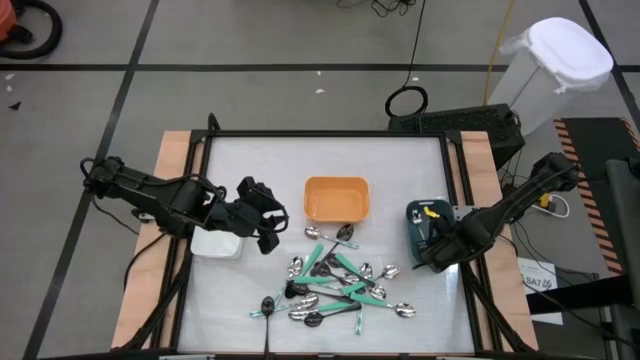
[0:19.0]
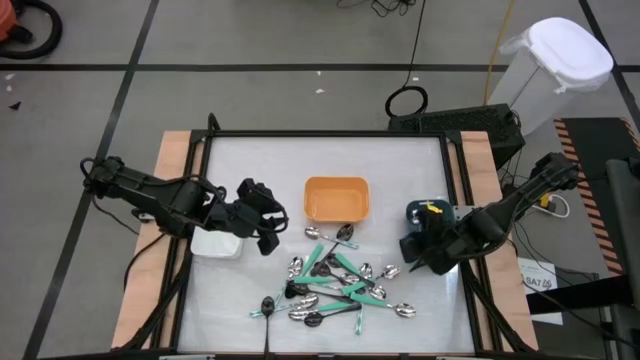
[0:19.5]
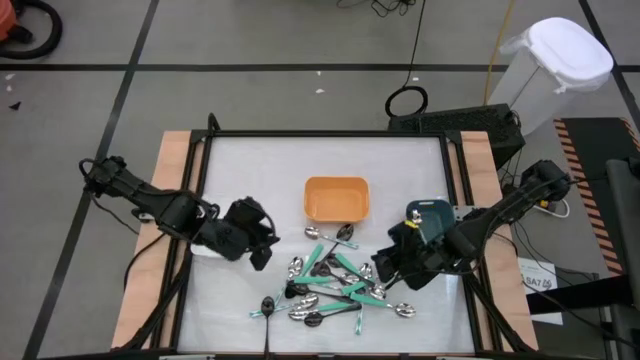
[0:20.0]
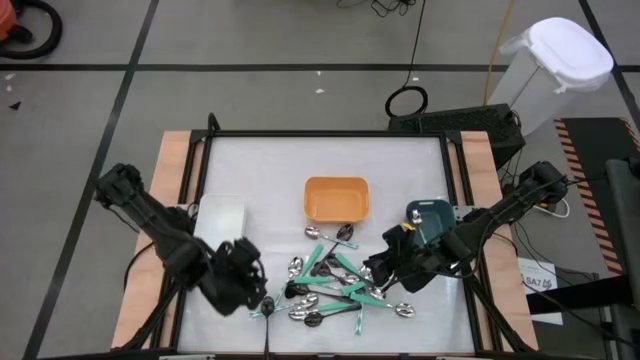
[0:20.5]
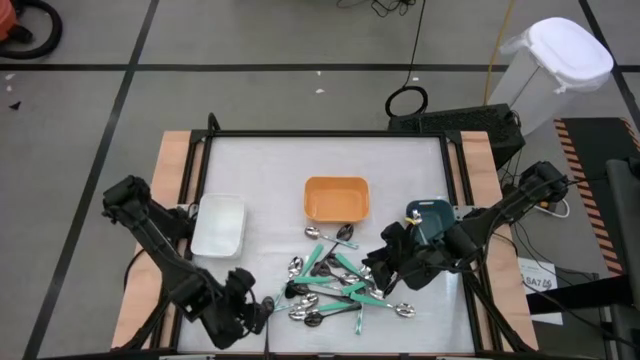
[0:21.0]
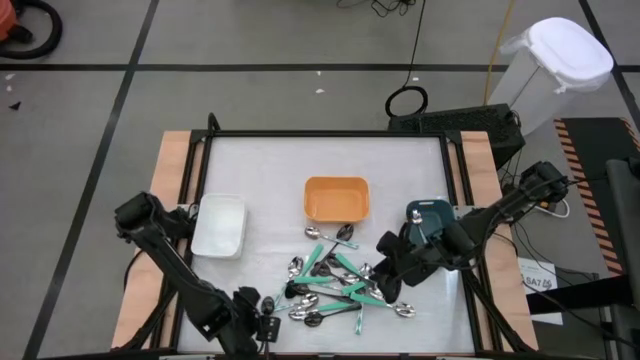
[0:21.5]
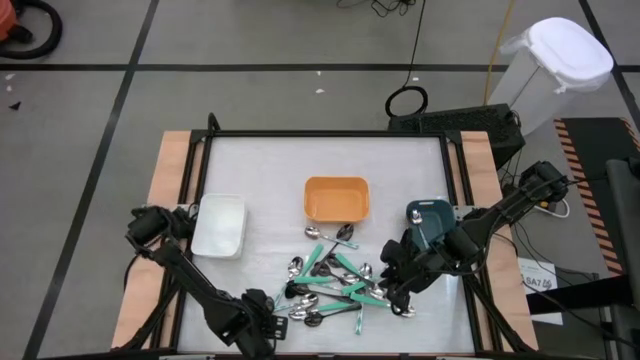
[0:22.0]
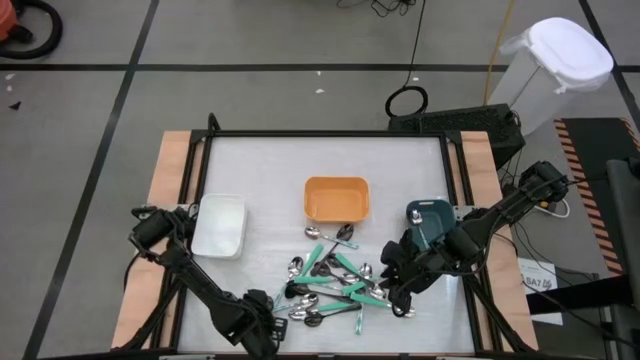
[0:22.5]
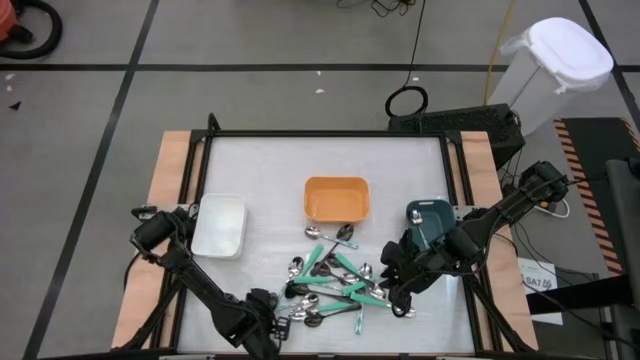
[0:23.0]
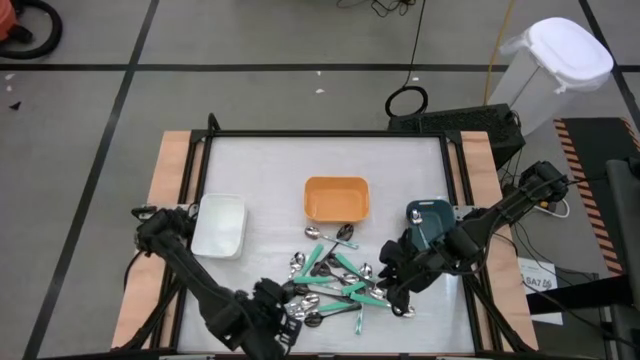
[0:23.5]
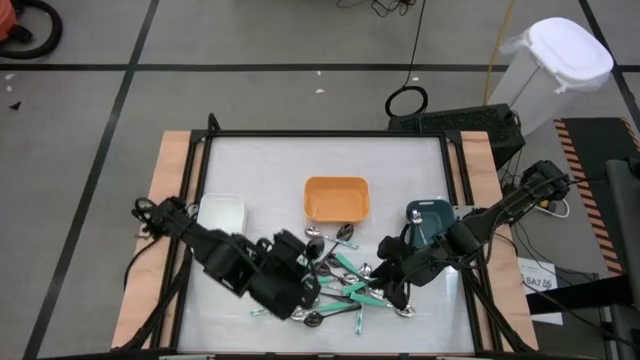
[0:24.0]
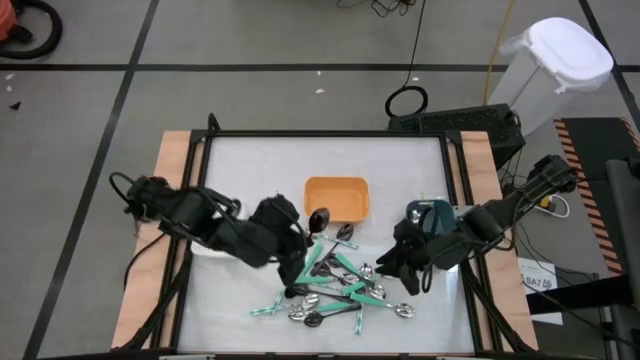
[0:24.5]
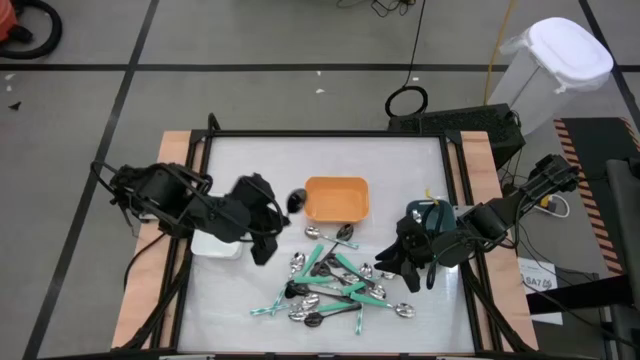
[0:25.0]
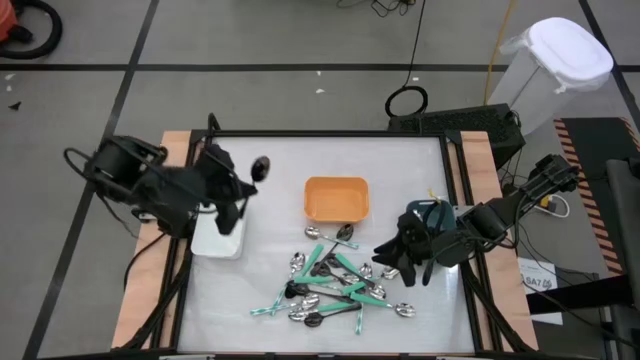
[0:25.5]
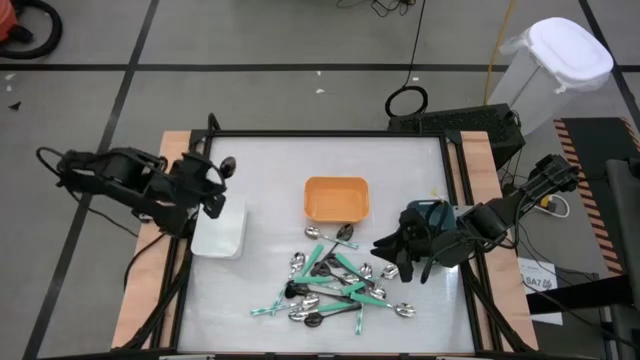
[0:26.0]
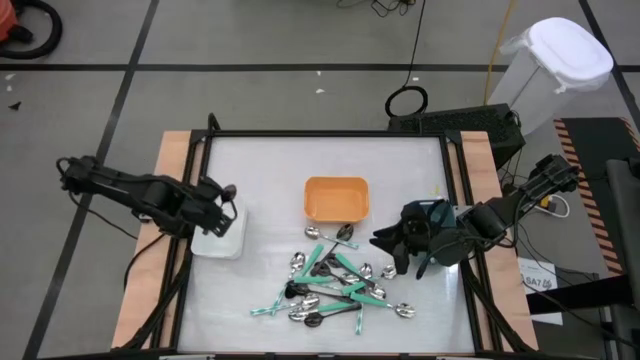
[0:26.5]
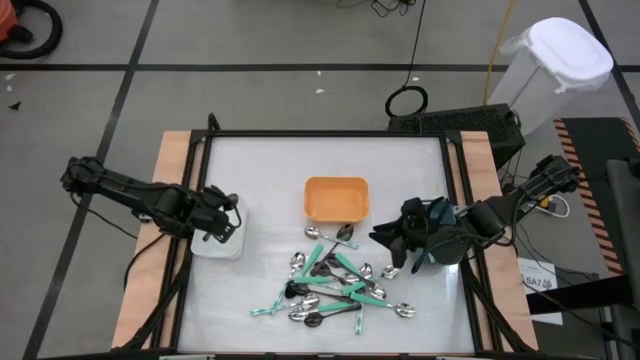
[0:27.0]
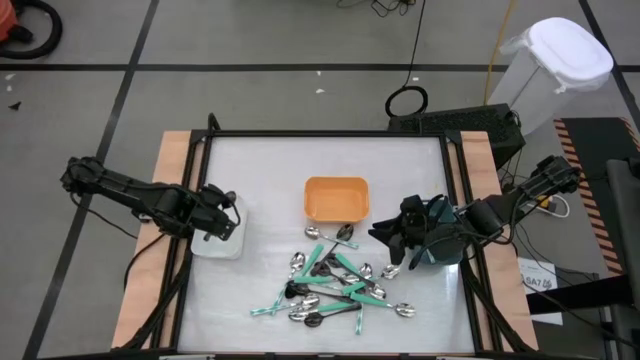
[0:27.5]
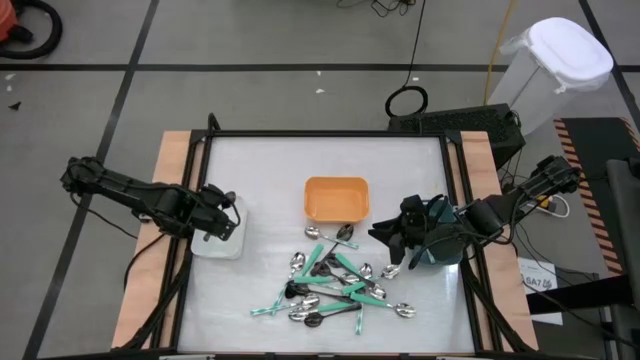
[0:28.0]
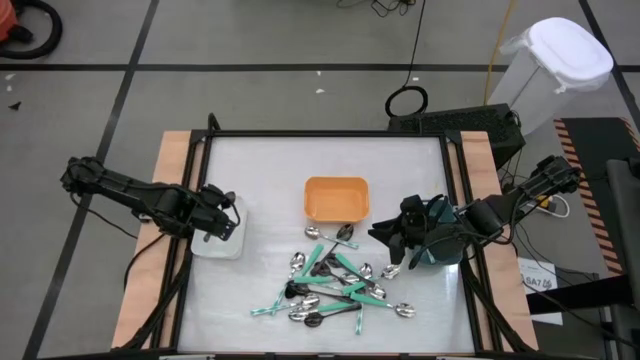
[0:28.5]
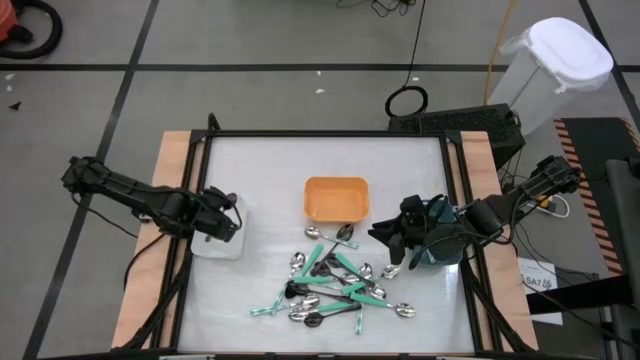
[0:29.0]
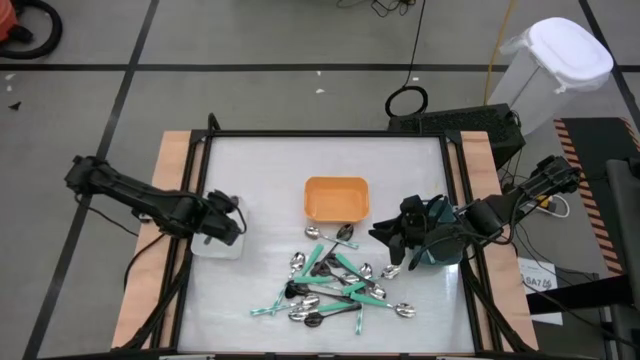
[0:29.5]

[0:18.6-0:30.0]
Task: Sort silverware by color (type)
Put the black spoon into the white bin

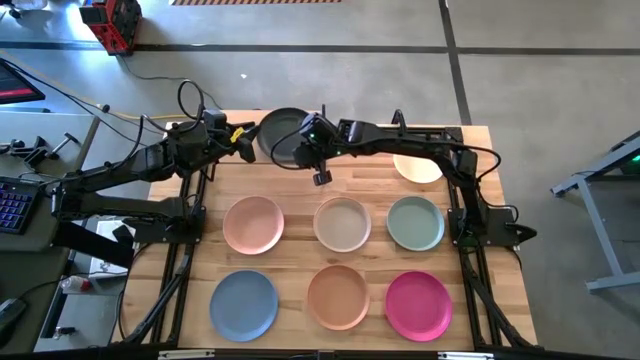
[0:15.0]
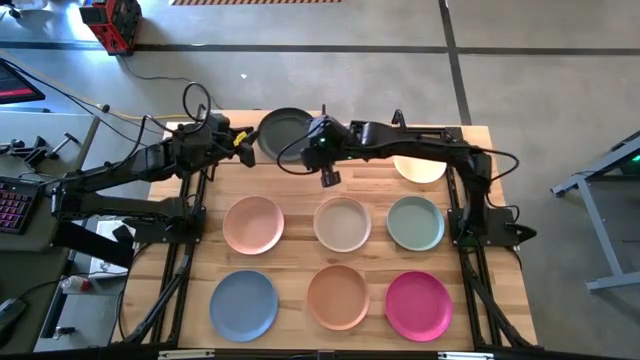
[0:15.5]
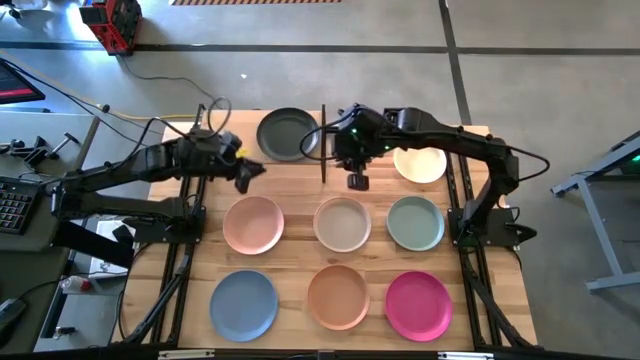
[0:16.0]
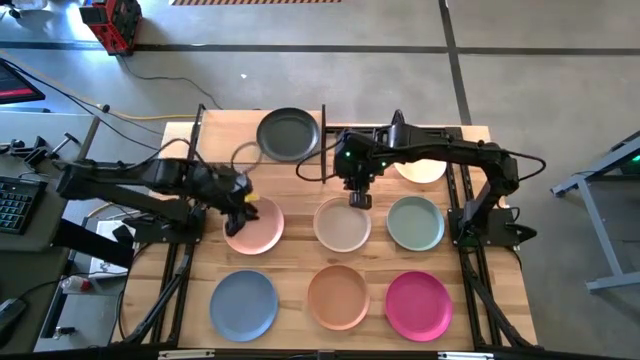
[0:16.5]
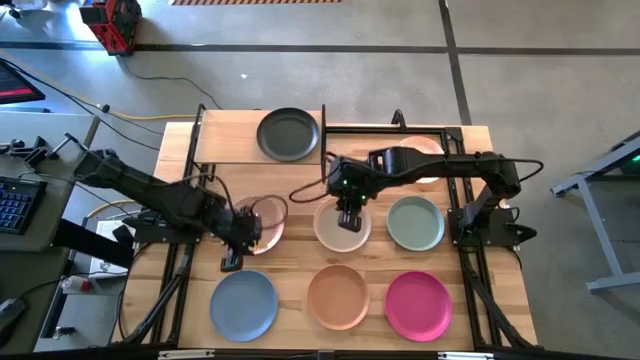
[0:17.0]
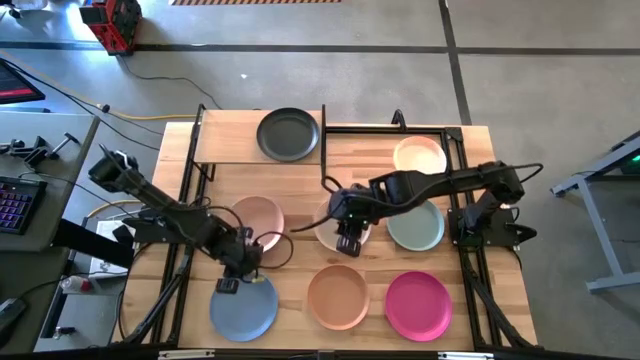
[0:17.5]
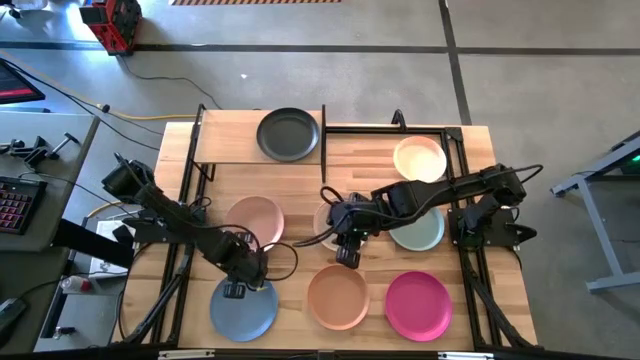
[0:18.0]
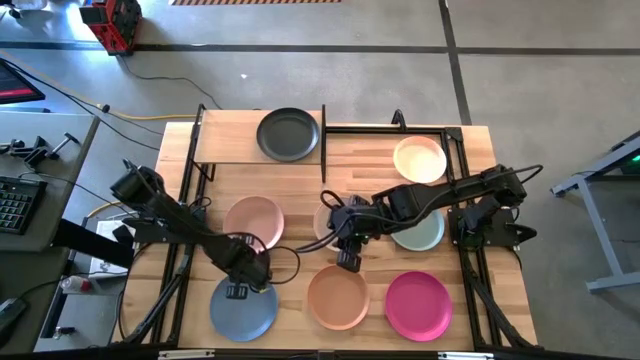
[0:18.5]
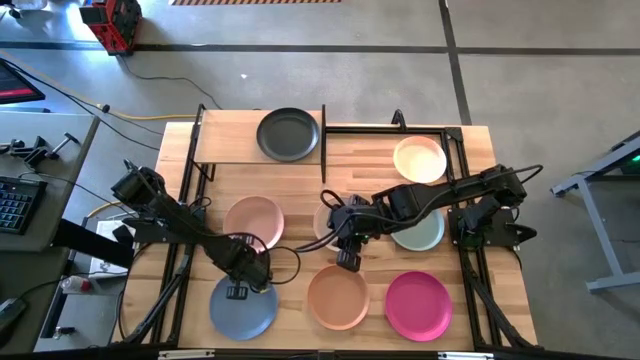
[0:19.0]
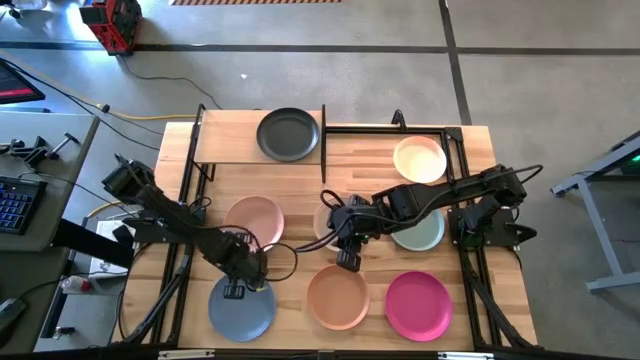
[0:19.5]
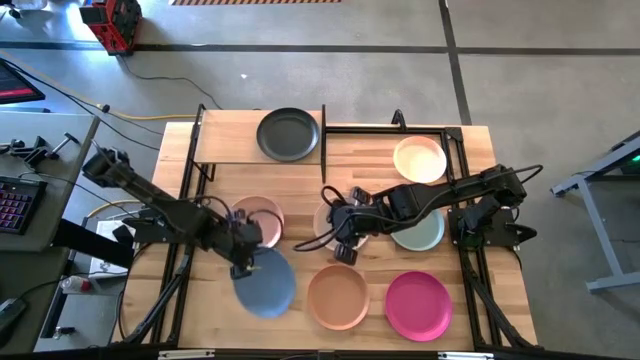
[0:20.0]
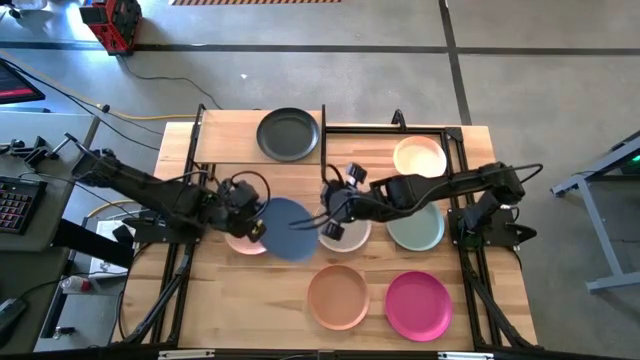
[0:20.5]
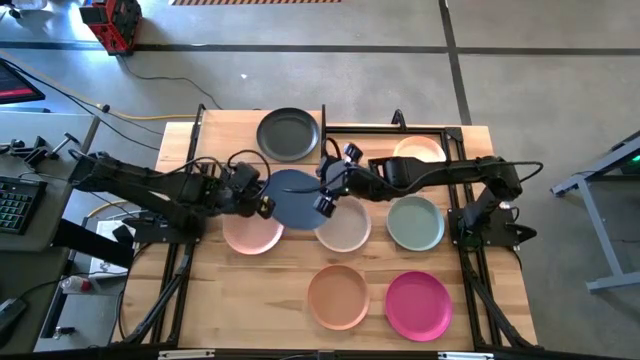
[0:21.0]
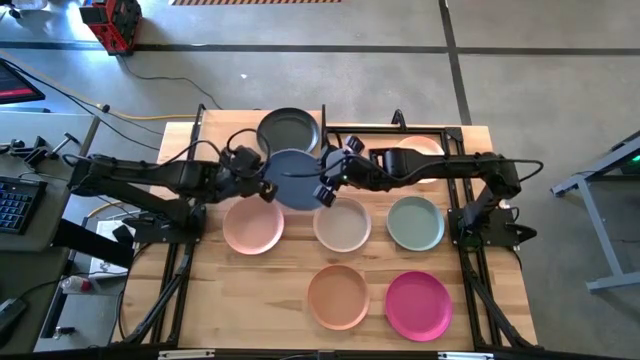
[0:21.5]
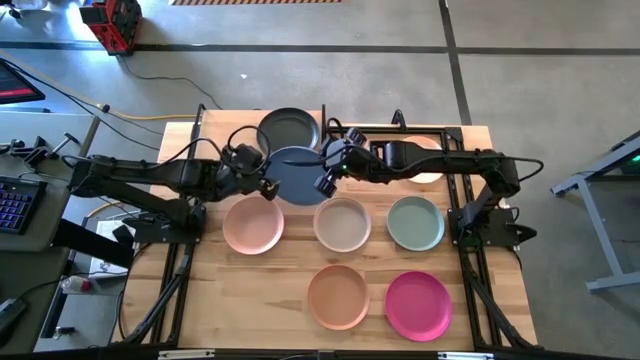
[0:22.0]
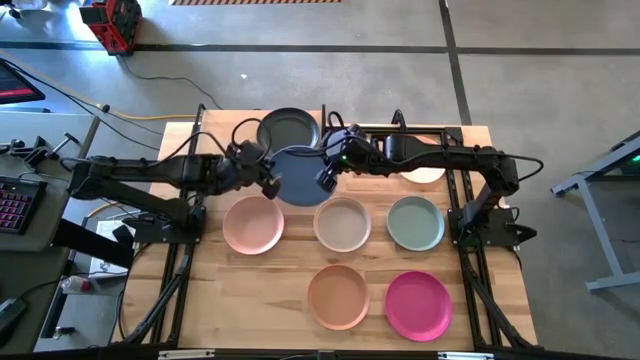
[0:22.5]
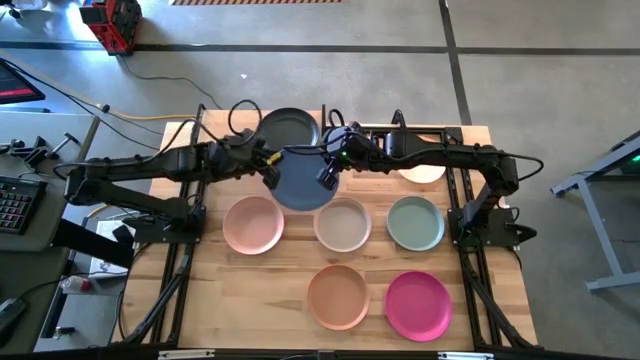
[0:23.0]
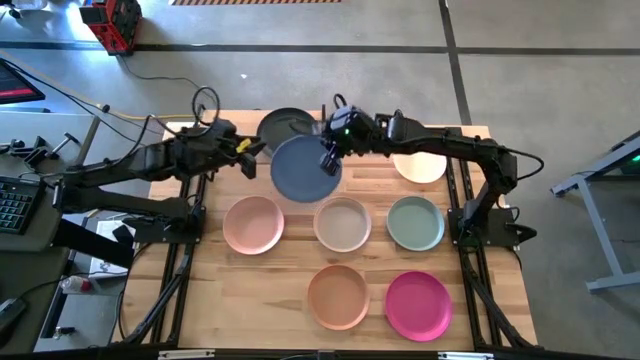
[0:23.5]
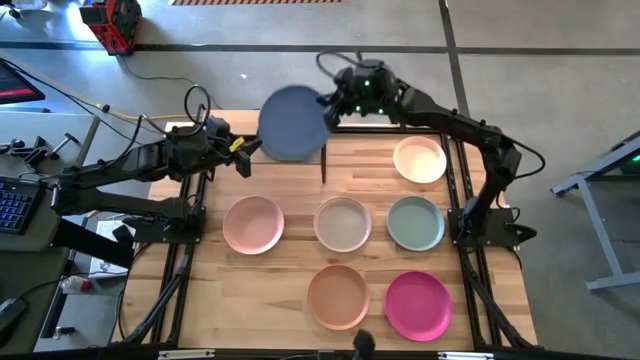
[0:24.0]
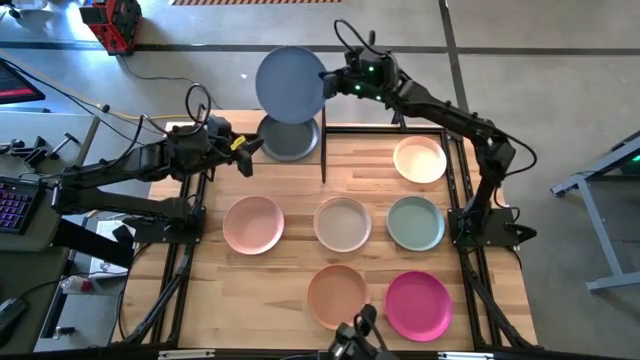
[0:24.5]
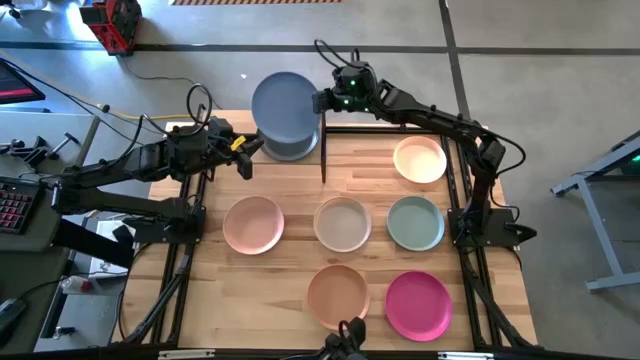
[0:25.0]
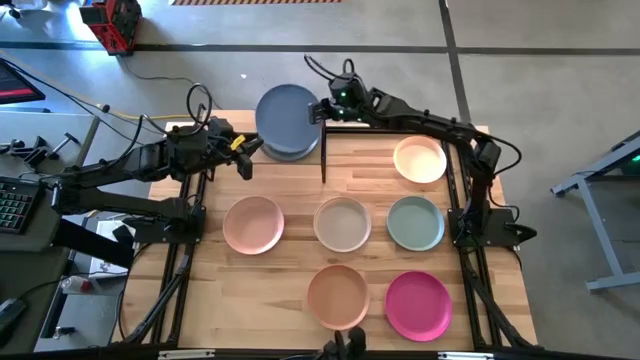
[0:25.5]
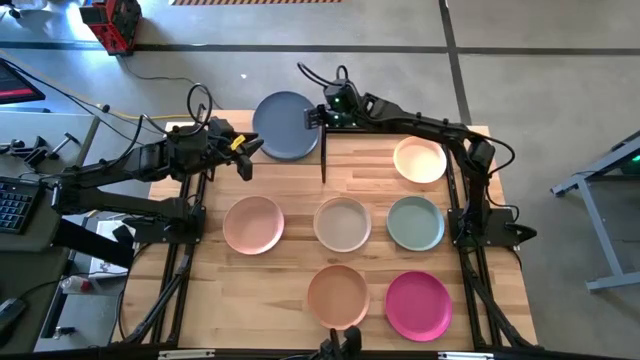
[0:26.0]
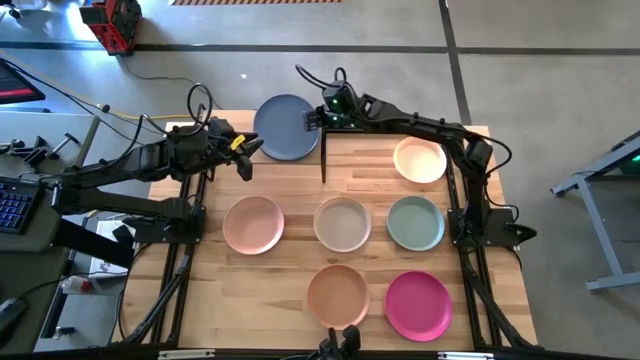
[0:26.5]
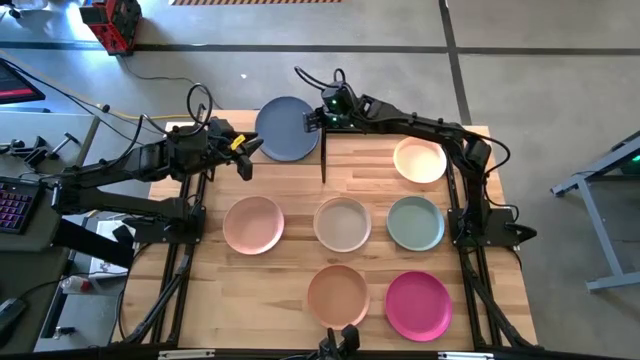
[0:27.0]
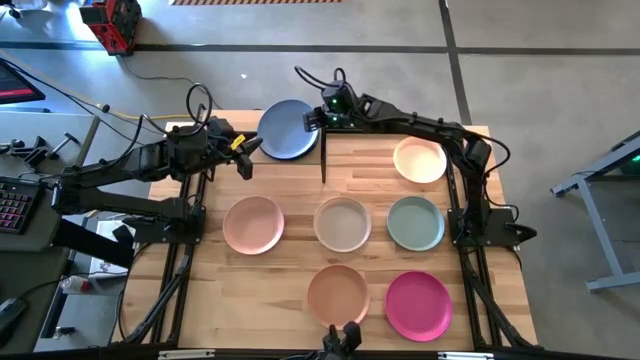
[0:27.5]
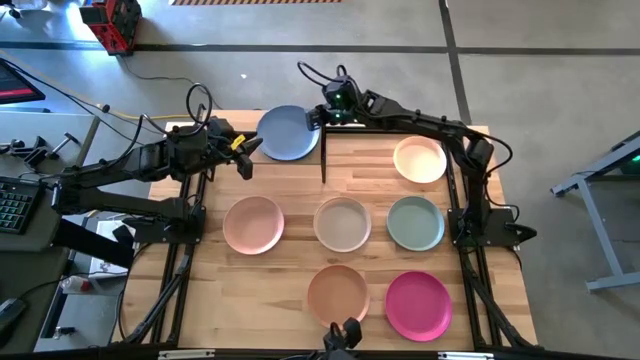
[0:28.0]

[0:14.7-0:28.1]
Task: Place and stack plates onto a shelf
Stack the blue plate on top of the black plate on the shelf
